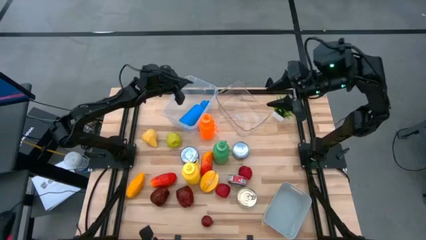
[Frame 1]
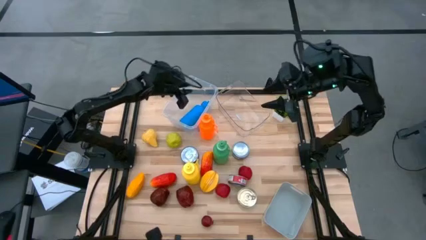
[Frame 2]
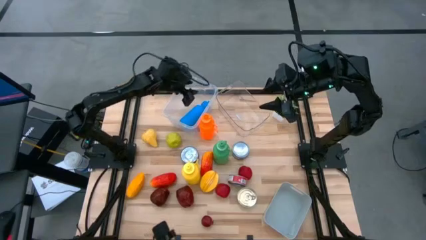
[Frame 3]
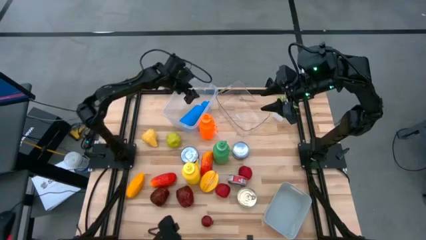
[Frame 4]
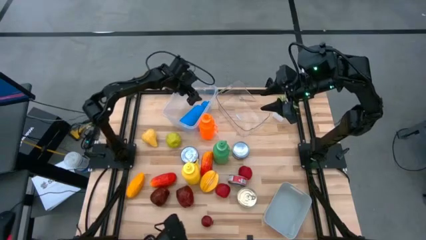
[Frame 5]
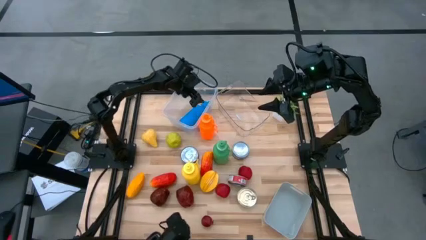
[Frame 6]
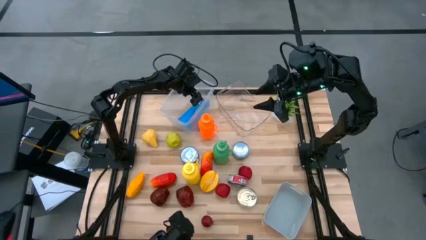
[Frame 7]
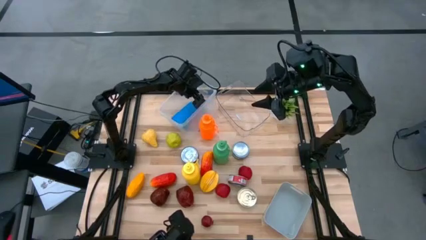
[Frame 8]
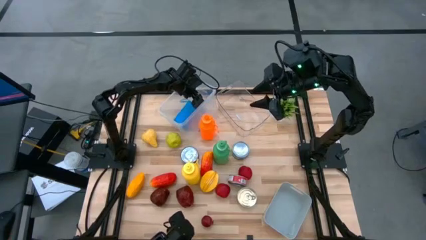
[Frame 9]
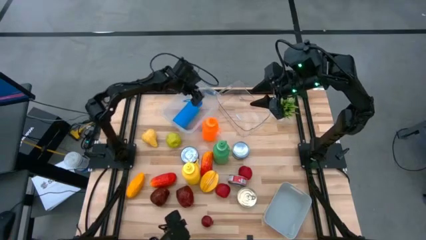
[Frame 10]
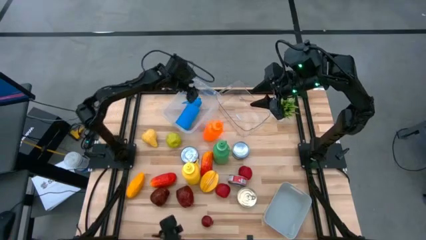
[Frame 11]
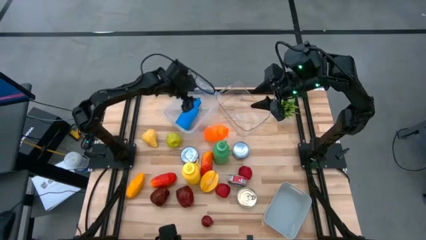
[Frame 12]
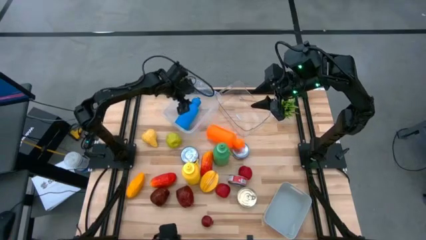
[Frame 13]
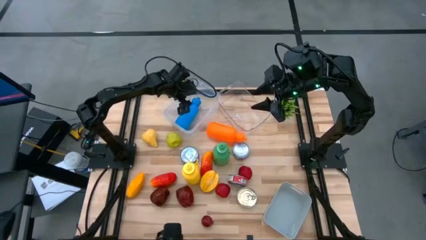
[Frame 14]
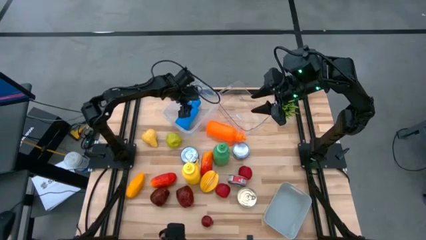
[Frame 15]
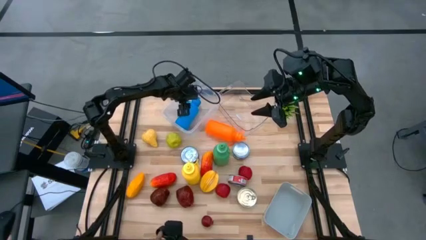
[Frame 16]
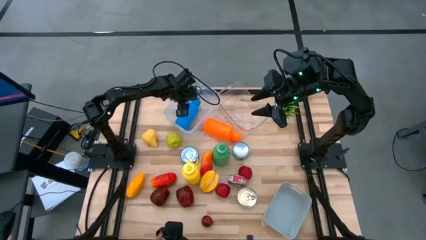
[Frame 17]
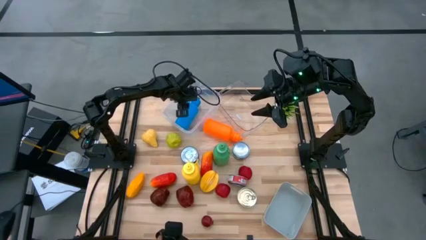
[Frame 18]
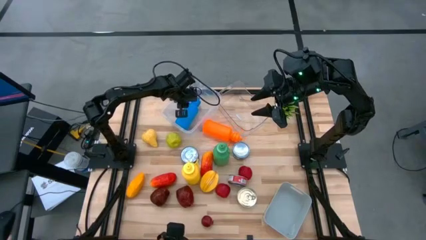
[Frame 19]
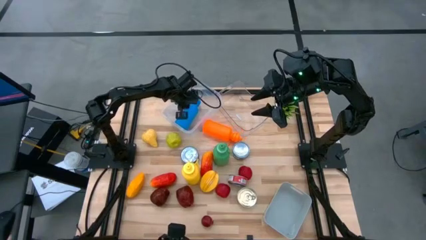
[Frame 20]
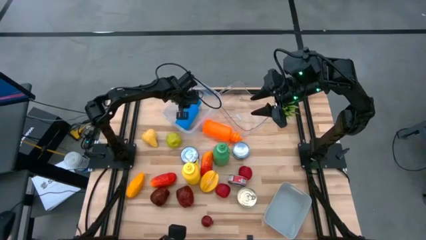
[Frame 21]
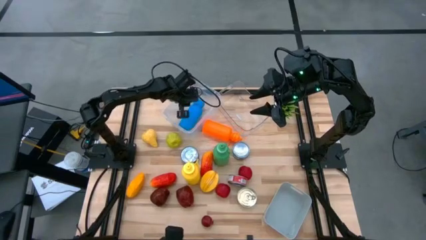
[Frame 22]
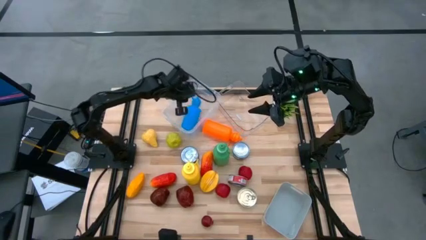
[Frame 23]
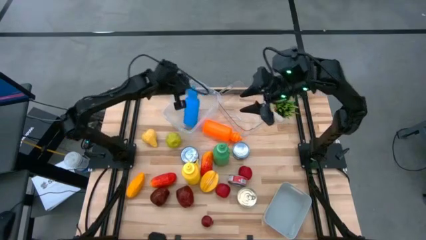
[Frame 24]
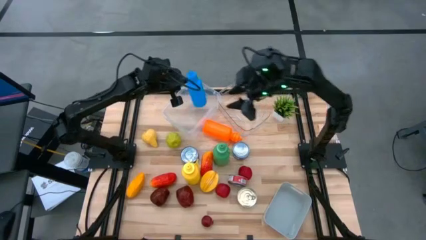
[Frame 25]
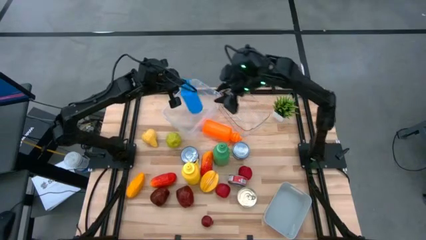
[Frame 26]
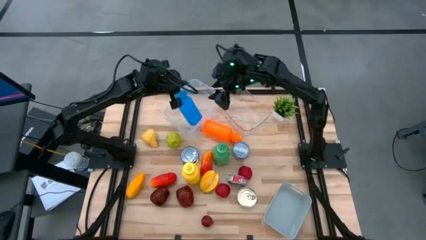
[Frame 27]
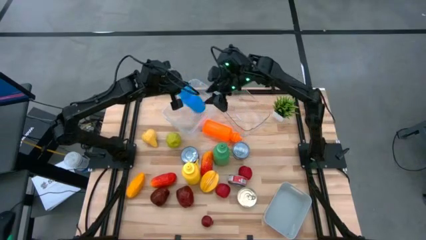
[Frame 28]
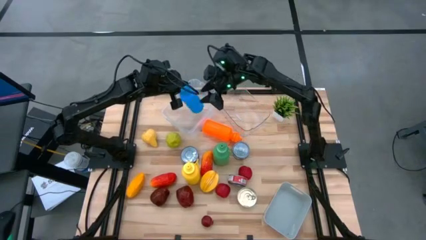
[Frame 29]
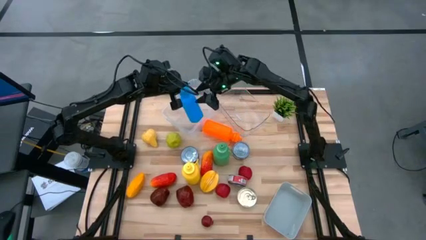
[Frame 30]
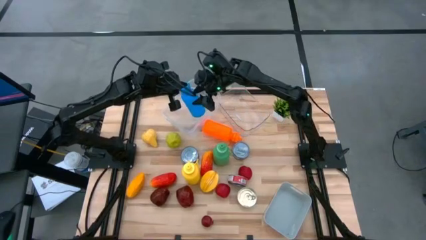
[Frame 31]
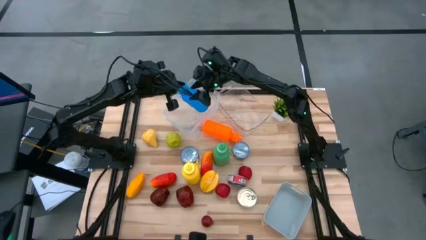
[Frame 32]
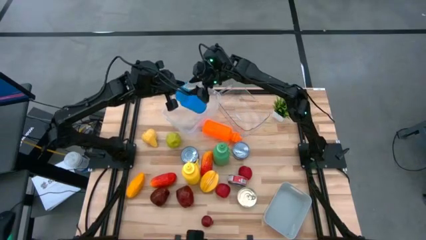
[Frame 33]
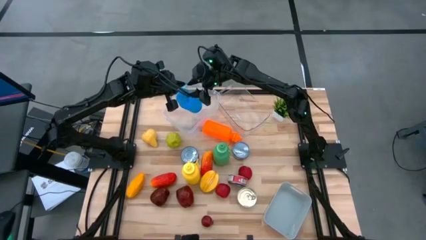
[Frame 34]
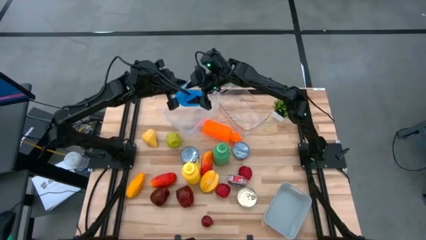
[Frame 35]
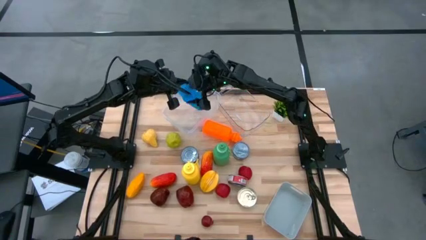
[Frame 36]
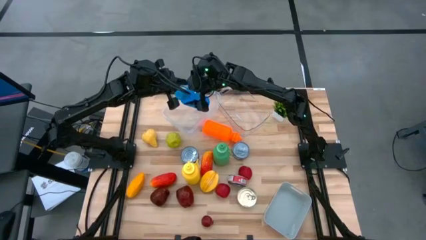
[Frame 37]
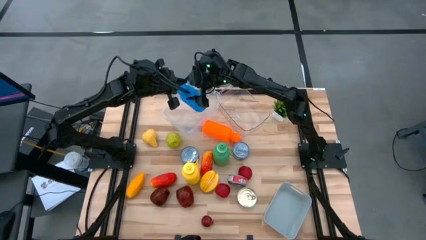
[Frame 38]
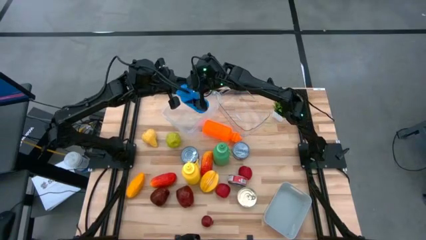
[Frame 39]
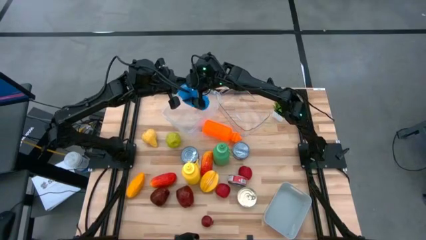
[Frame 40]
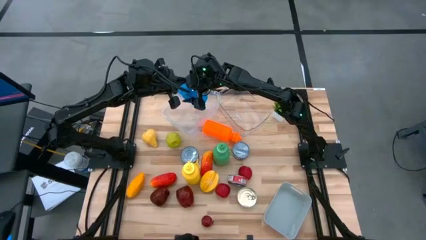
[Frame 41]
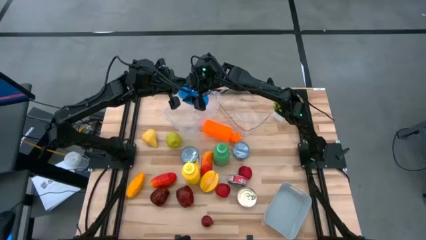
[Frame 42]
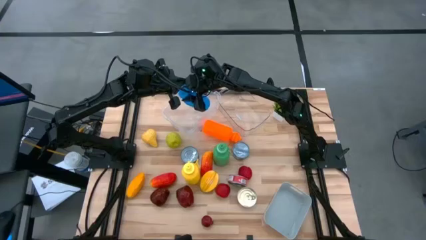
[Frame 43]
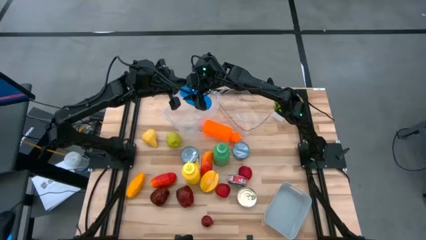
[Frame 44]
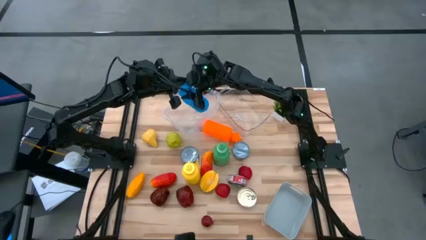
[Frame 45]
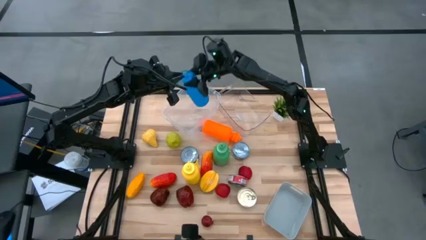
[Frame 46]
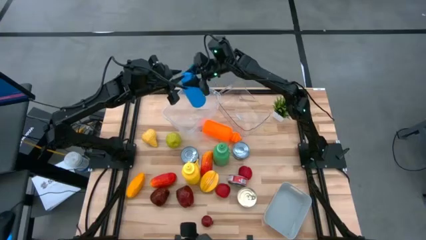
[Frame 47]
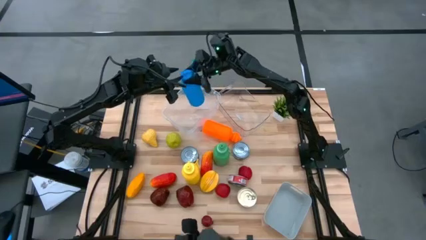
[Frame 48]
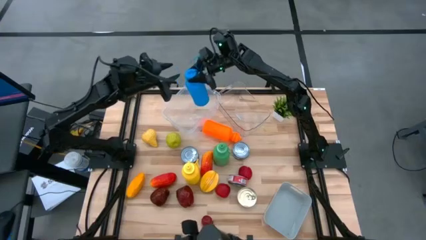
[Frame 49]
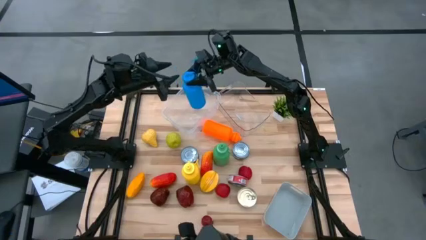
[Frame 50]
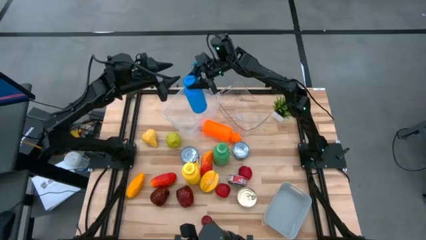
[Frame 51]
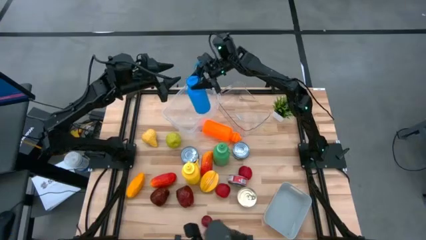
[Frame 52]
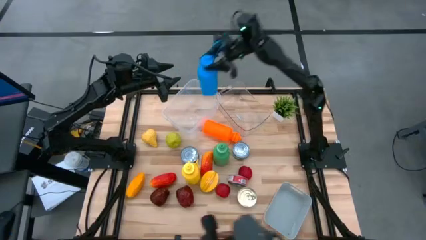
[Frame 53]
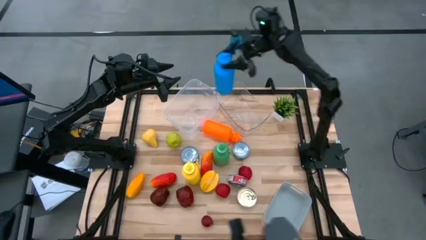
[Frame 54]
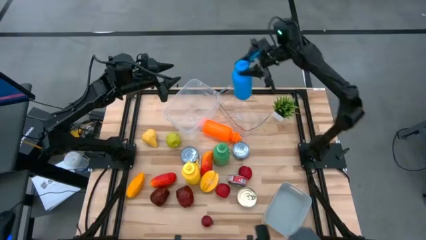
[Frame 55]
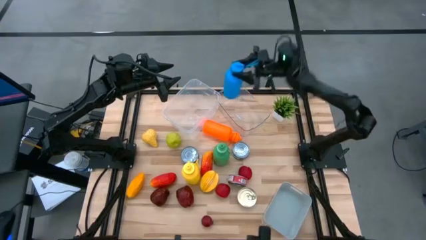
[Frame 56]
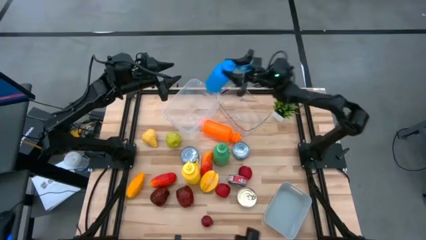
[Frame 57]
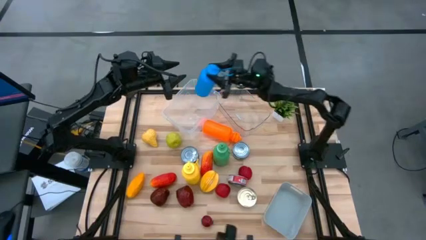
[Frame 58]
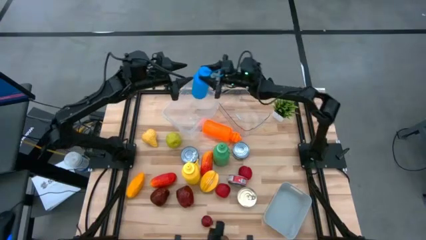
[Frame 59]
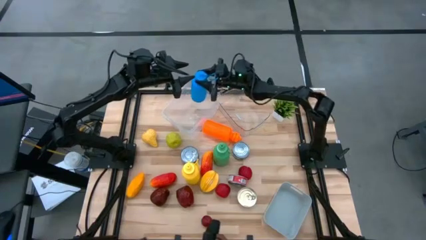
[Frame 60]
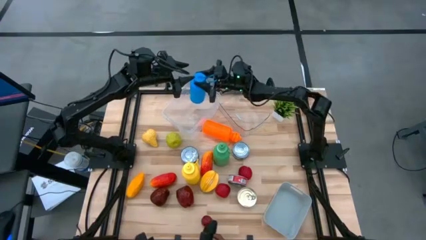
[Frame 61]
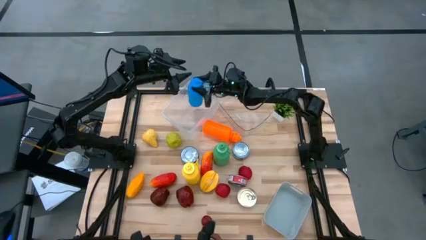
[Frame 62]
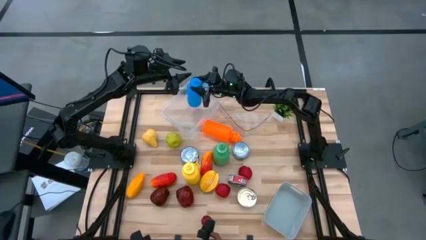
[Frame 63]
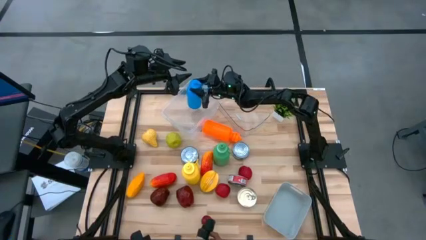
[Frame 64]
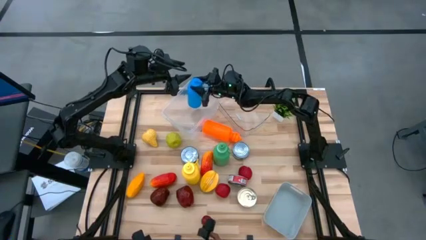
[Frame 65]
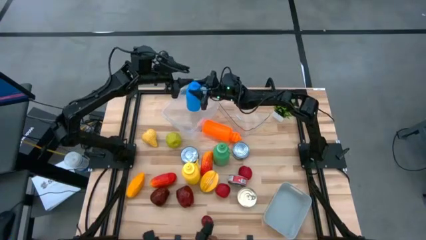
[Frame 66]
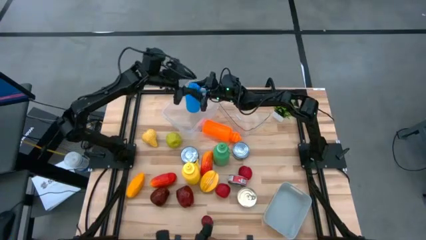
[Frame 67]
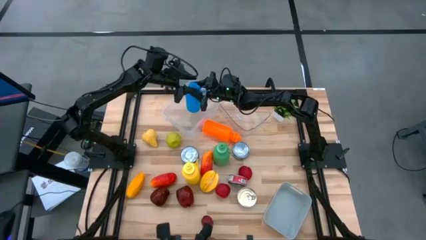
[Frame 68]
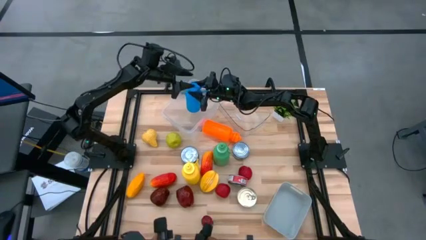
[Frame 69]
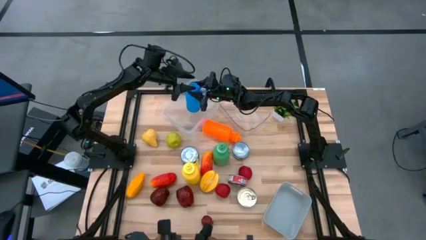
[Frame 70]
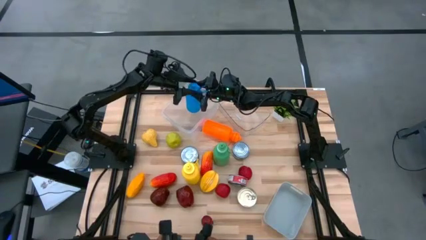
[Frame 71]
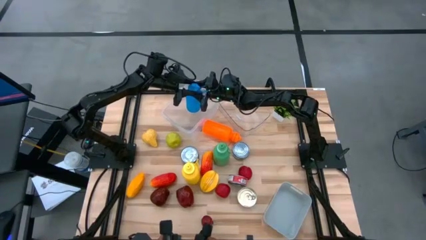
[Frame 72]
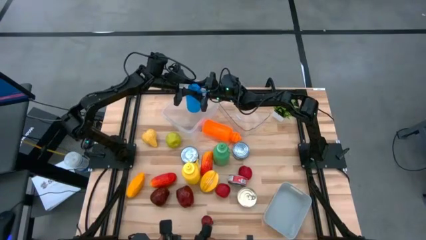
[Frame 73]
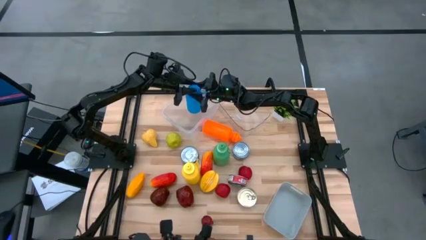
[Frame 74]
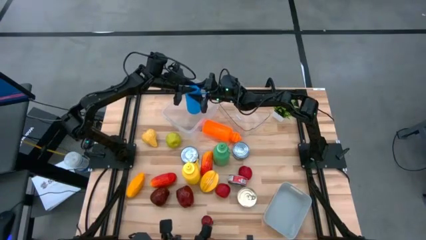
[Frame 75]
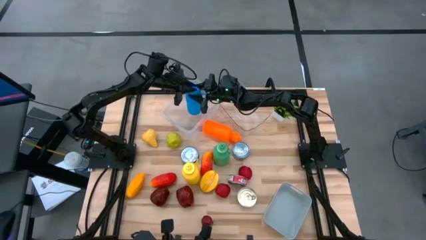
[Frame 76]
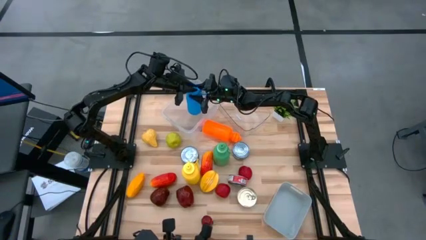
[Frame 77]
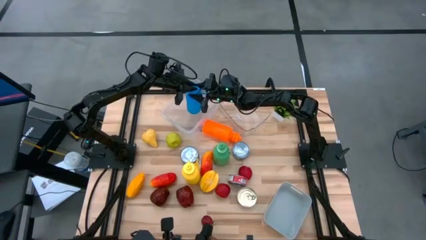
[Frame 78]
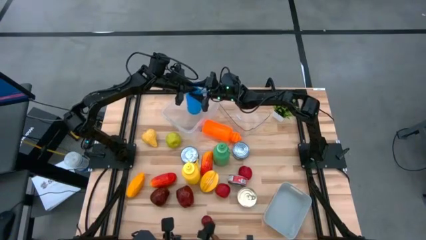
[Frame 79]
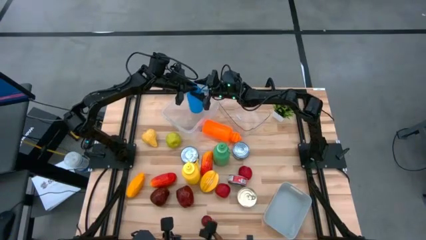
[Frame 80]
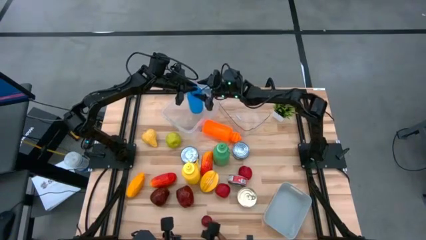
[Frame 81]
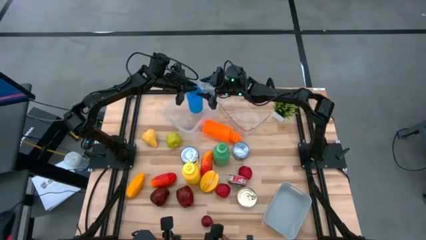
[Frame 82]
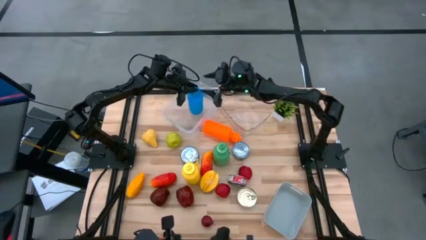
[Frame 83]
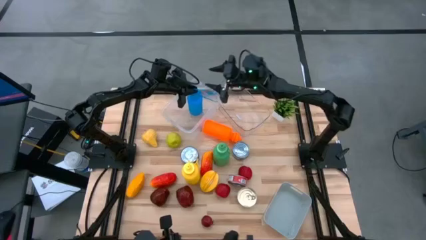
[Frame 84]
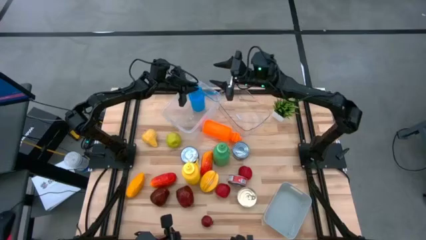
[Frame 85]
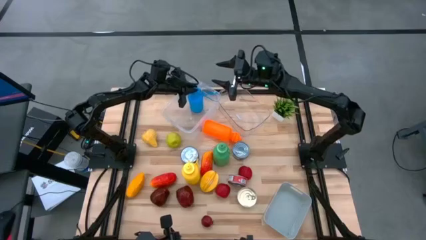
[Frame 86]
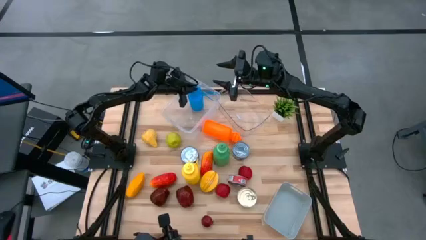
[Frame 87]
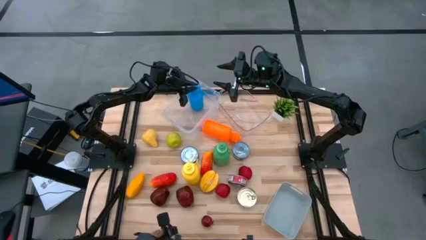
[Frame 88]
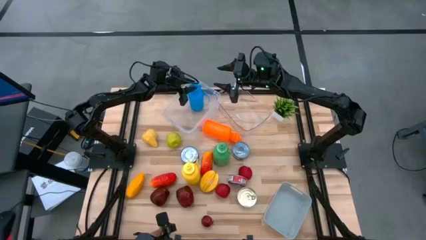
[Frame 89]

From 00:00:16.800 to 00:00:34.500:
Task: Pick & Place Food Item
Put the blue water bottle into the left transparent bin
